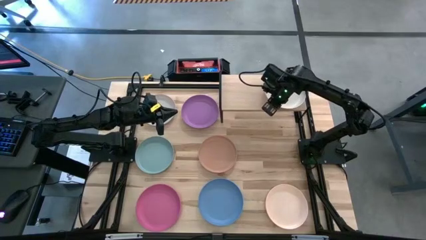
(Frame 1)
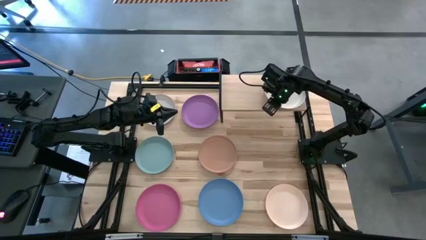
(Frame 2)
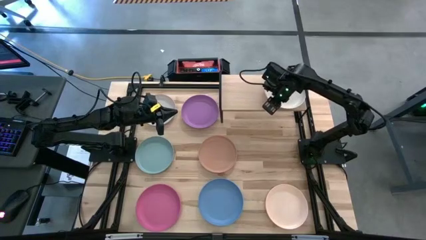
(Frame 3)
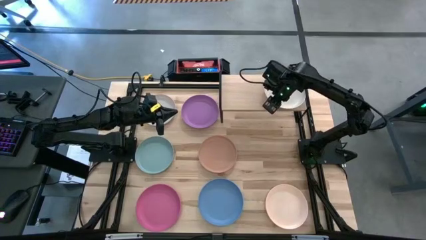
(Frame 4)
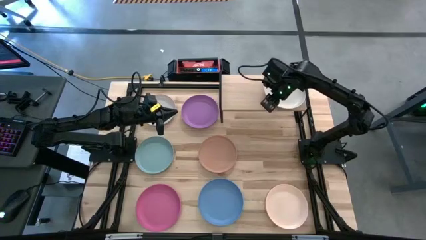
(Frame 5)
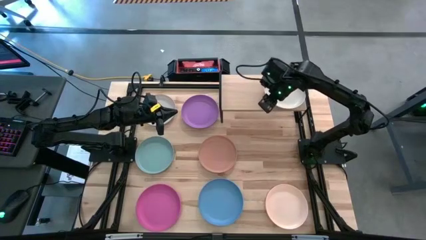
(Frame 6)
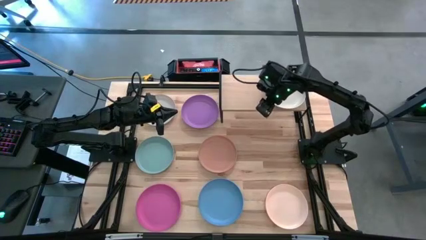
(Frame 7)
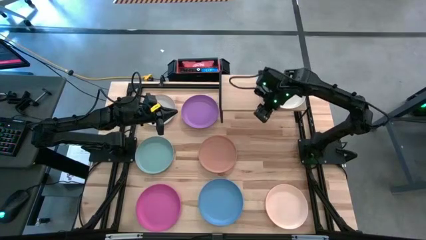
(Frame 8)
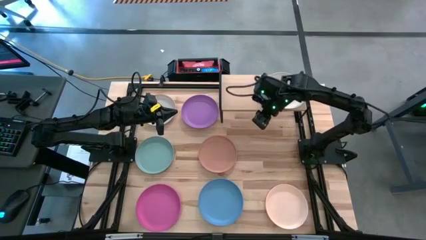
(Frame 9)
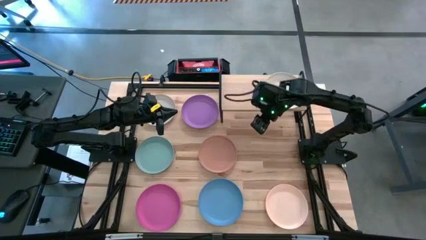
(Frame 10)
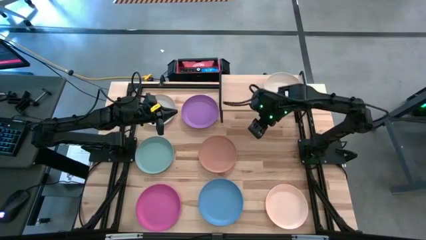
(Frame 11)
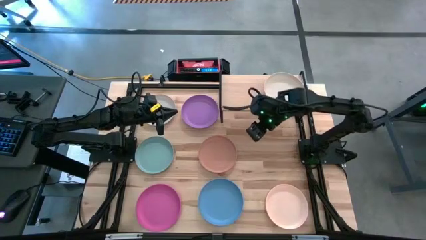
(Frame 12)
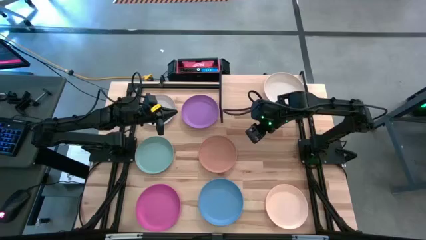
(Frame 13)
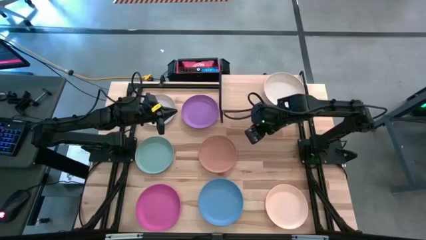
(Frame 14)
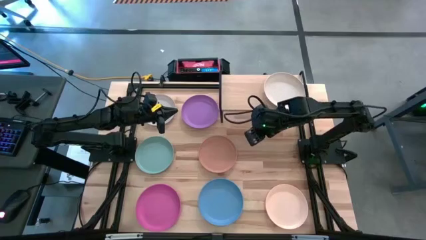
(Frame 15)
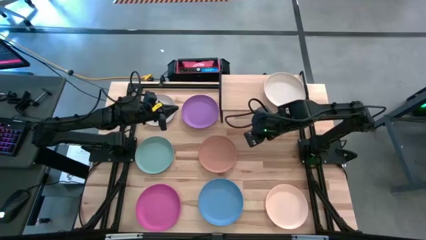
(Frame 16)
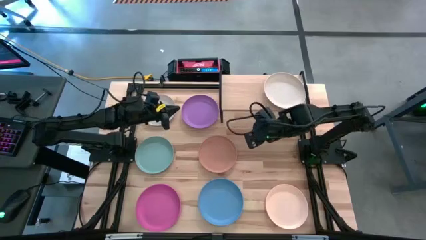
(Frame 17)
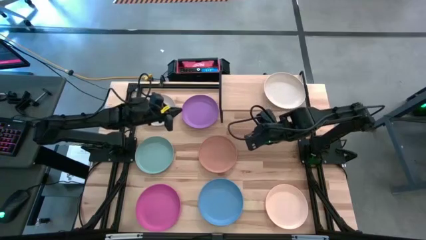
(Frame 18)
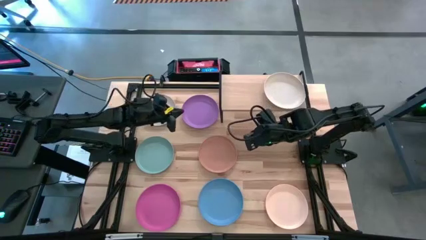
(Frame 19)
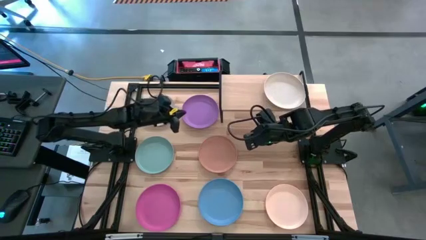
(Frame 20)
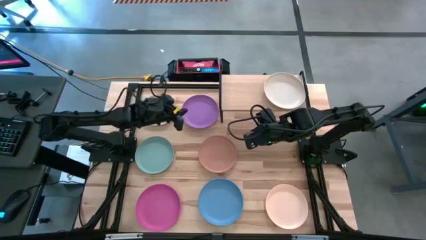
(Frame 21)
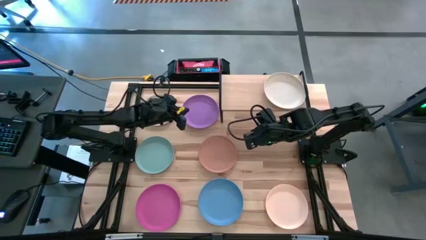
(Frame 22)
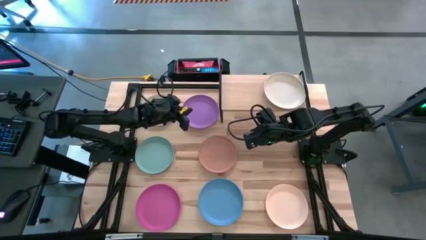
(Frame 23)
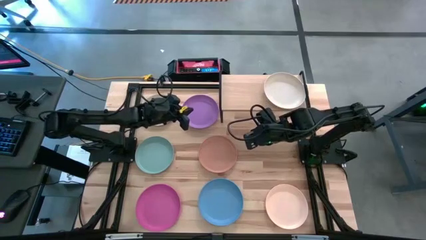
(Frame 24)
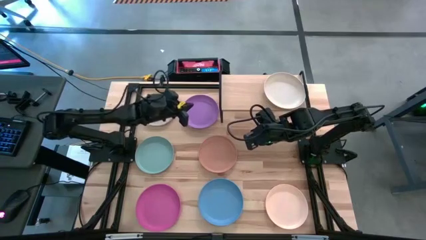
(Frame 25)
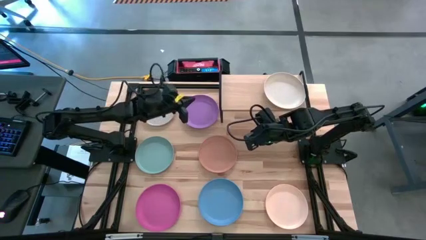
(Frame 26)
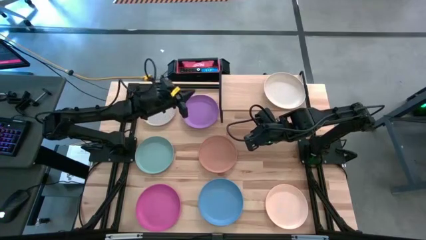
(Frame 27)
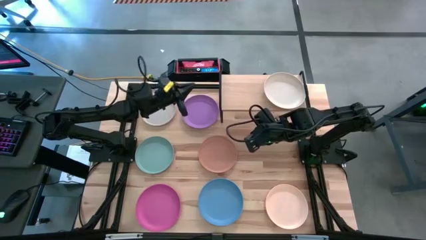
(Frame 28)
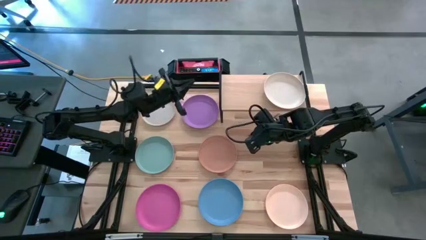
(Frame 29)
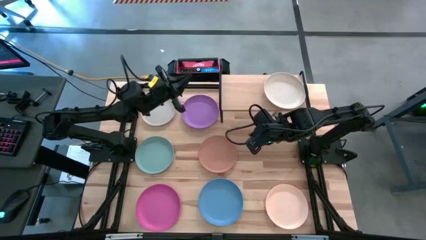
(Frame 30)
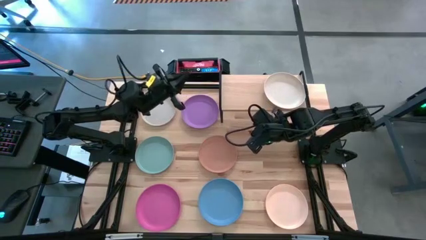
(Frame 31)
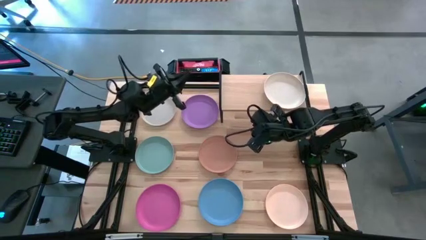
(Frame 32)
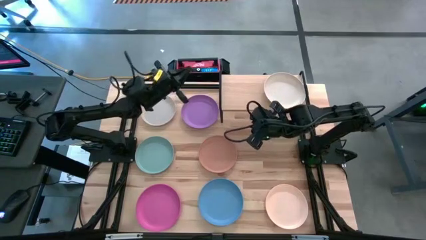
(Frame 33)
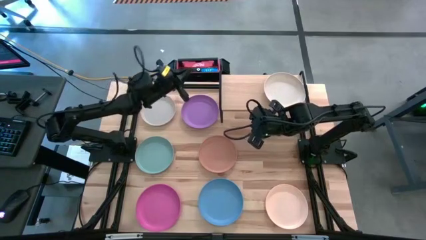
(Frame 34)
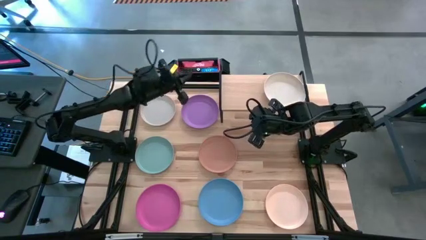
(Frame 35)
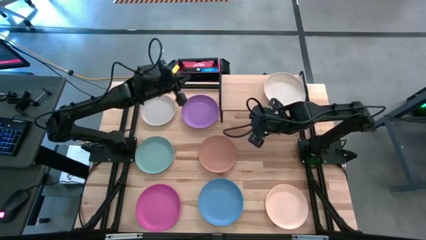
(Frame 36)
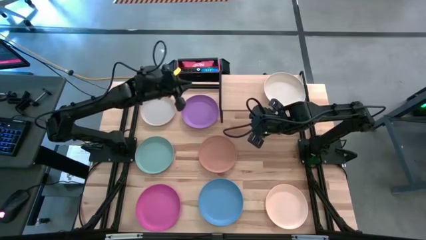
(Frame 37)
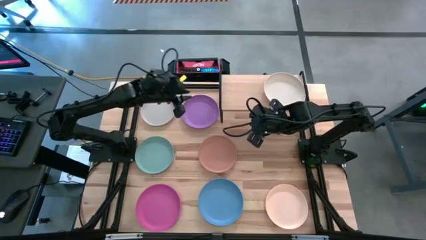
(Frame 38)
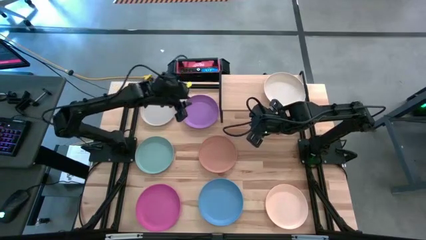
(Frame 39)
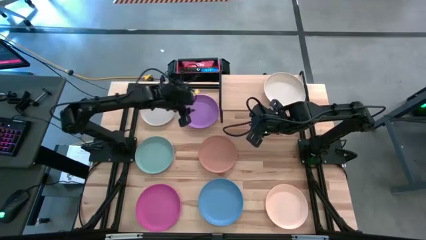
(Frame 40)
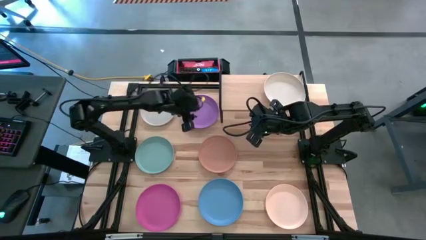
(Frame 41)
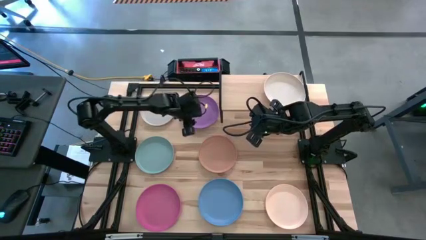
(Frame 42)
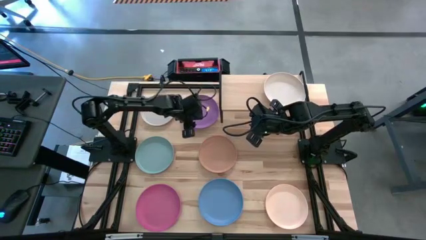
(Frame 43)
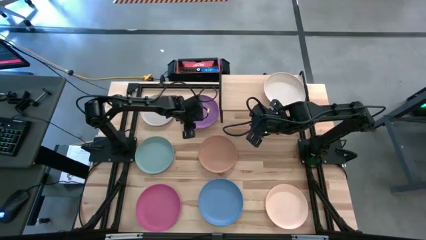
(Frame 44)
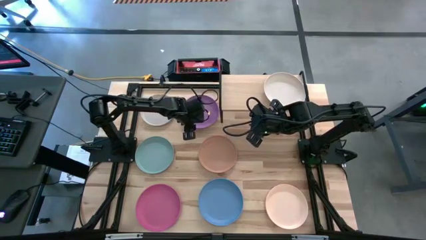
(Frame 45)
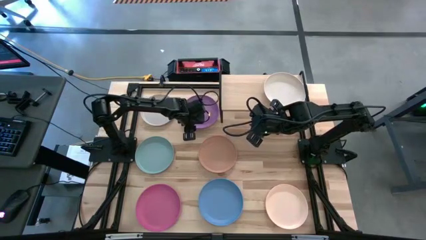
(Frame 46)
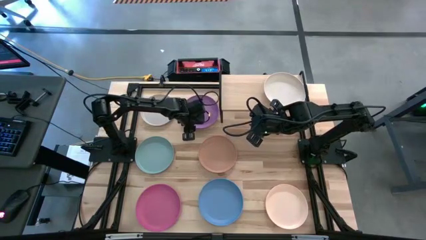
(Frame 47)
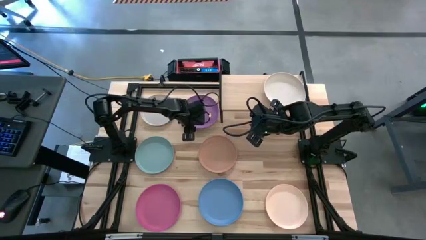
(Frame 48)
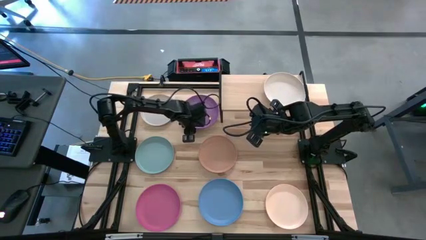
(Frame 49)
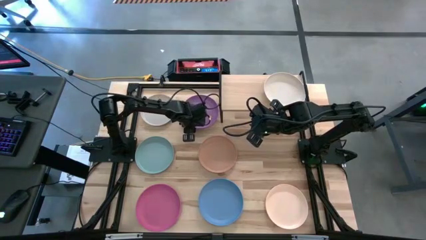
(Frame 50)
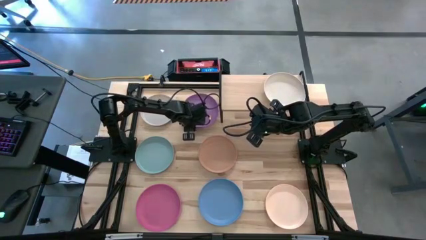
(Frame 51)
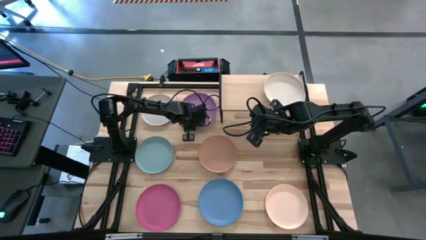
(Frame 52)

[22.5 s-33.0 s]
Task: Place and stack plates onto a shelf
Stack the purple plate on top of the white plate on the shelf

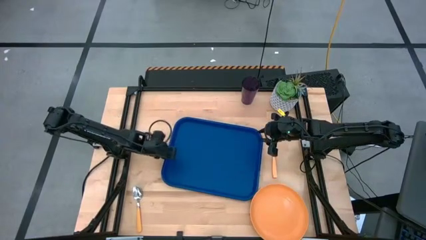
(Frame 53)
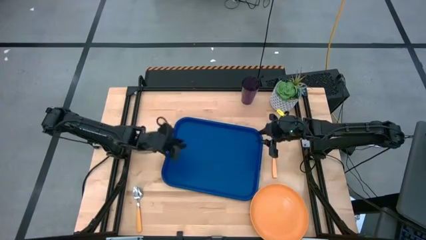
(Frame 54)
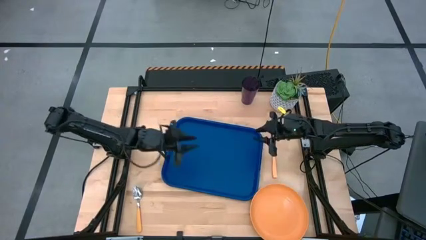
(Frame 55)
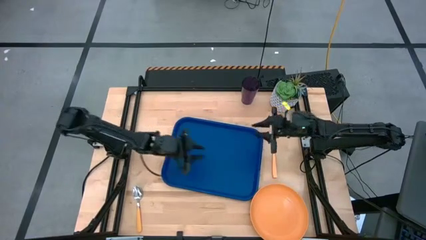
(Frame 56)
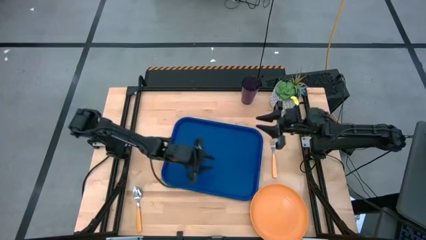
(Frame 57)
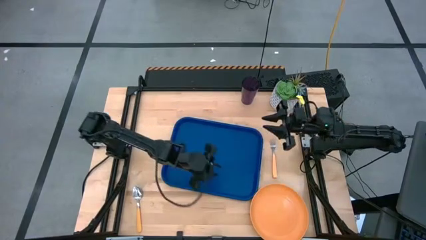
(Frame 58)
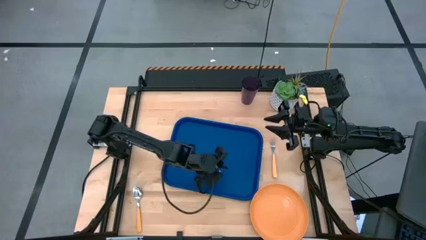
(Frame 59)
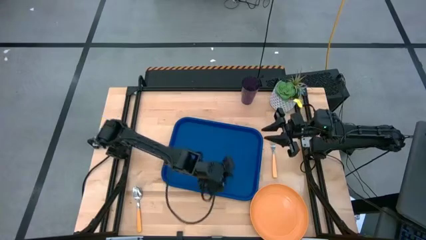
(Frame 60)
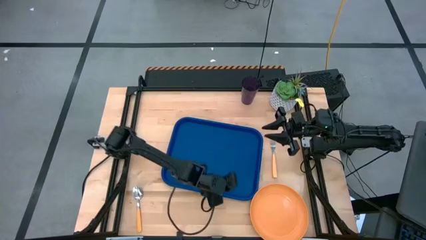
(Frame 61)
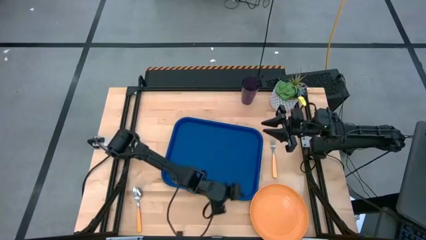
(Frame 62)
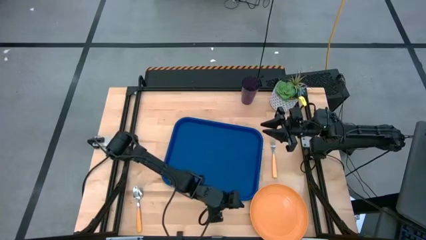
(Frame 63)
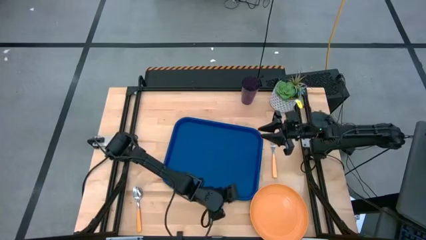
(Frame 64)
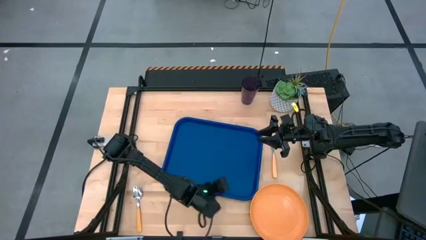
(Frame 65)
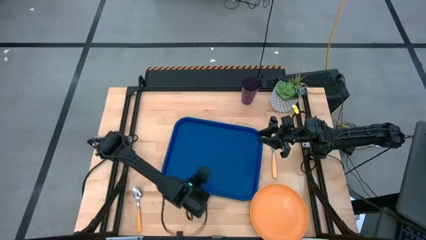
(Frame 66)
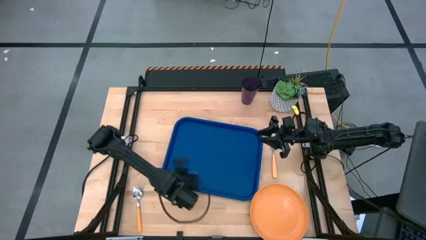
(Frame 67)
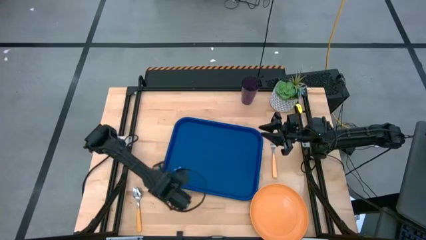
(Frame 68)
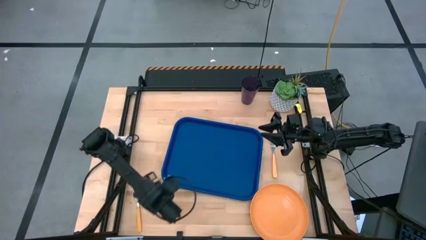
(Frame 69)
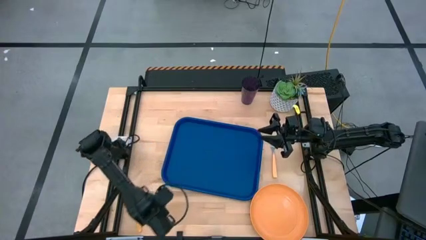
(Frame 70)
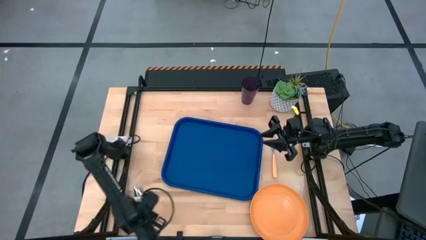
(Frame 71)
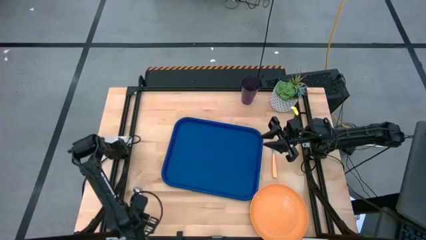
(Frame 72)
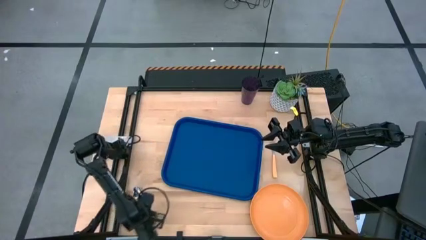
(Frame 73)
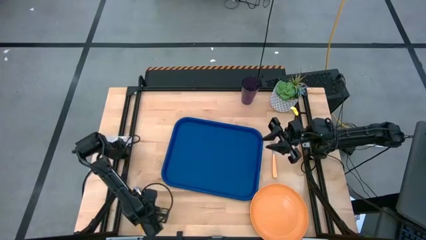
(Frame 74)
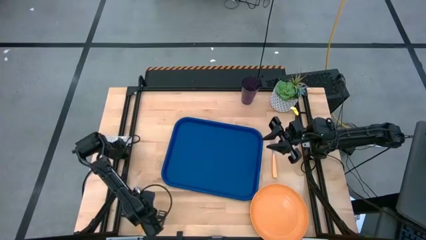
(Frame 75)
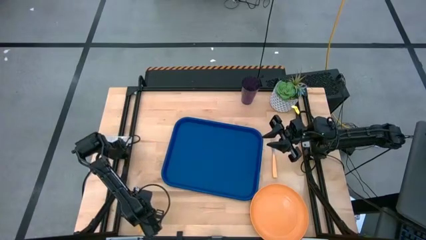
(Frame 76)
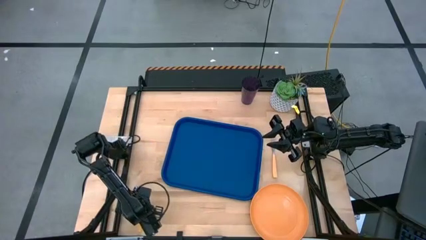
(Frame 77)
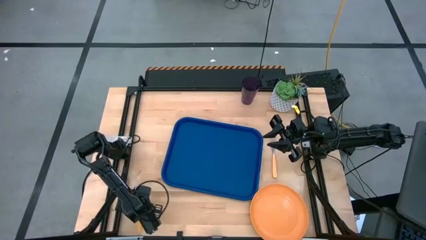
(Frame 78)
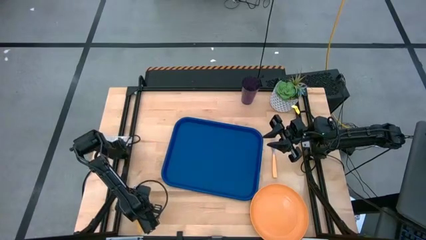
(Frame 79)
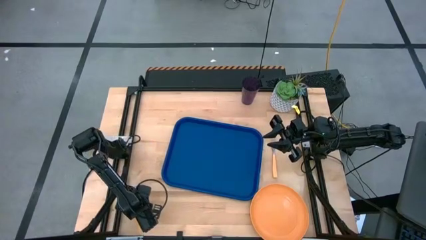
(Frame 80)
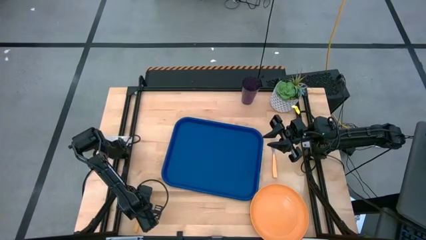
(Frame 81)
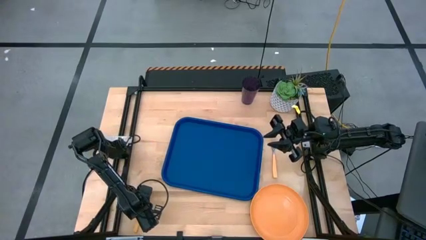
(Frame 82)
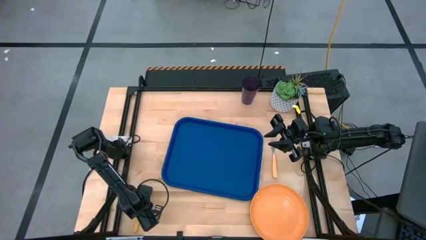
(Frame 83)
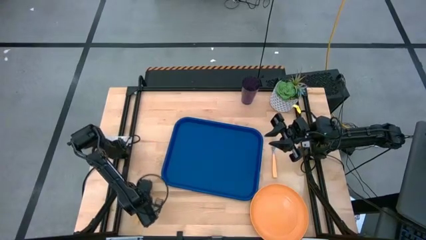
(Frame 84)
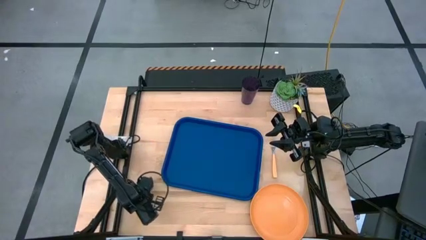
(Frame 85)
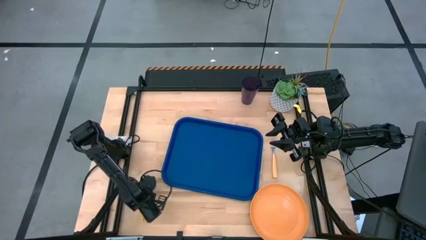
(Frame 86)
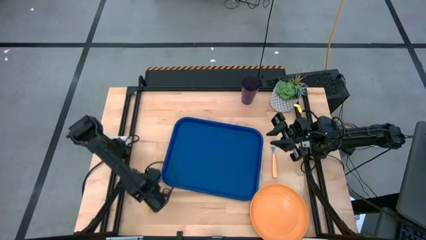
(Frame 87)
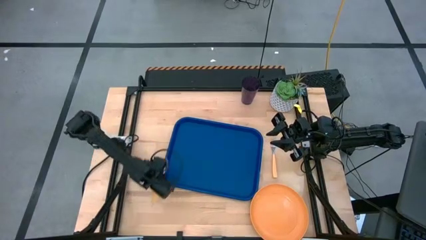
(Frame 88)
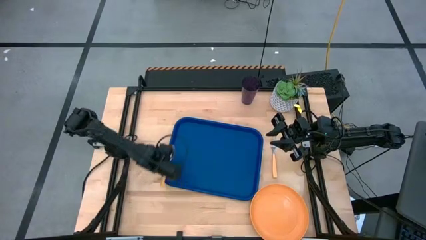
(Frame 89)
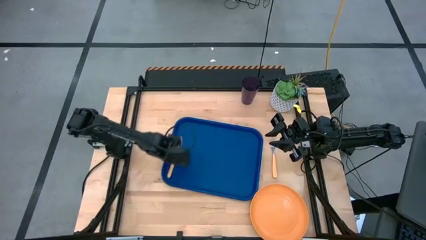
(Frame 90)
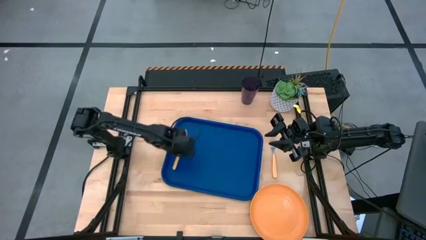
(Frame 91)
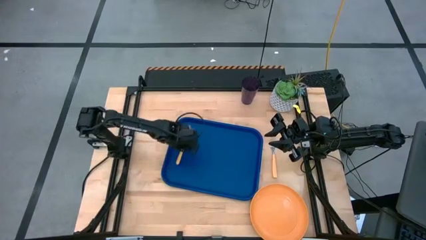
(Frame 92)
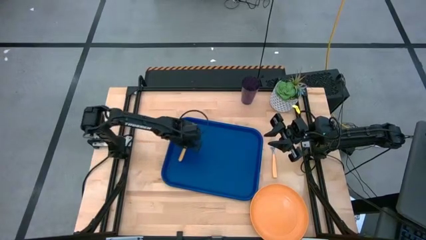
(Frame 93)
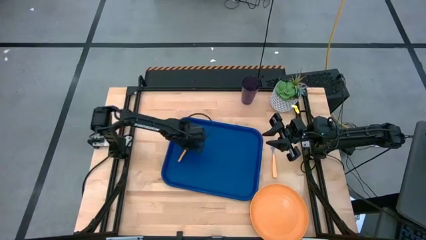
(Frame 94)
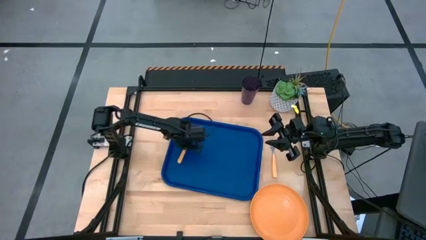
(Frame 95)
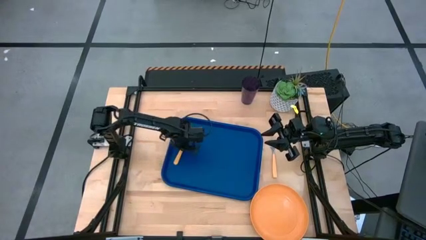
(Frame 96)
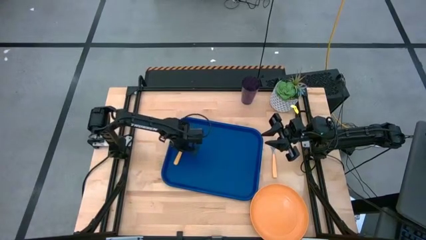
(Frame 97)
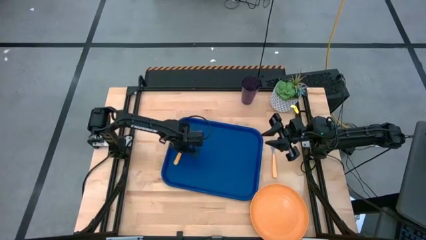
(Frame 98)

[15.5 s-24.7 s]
Task: Pick and place plate/cup/fork/spoon on tray
Put the yellow spoon on the left of the blue serving tray
